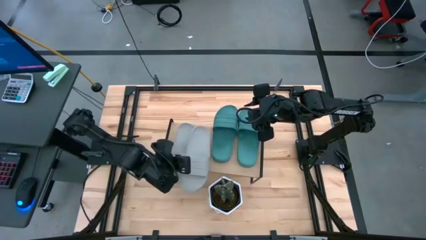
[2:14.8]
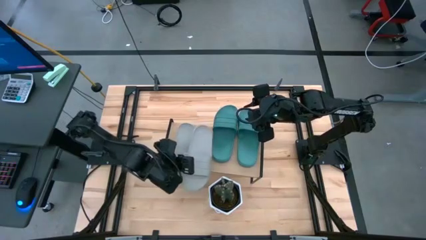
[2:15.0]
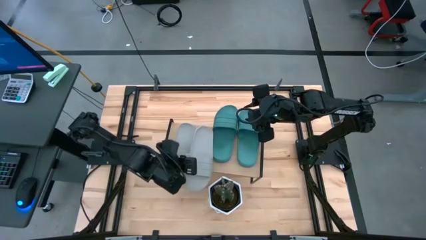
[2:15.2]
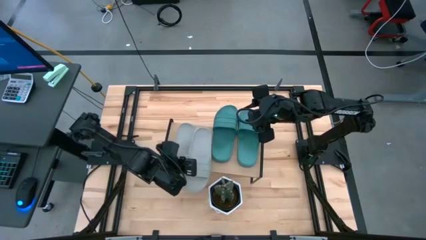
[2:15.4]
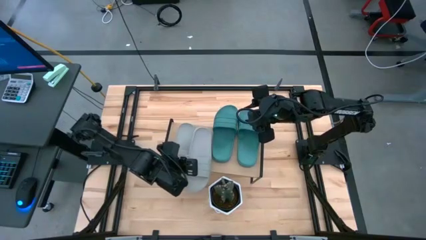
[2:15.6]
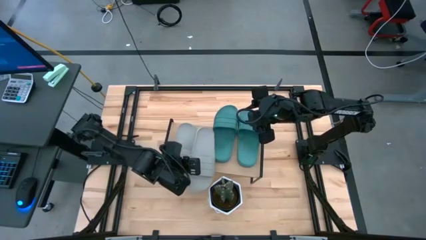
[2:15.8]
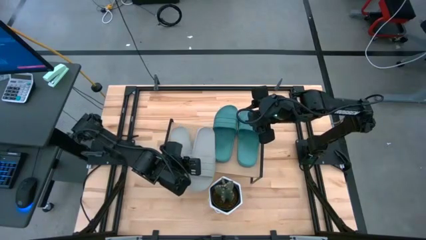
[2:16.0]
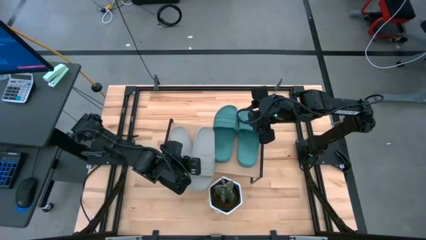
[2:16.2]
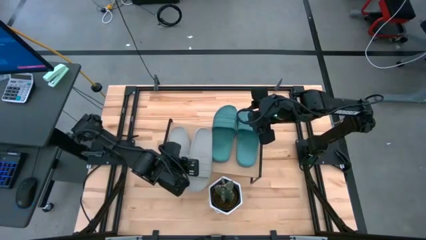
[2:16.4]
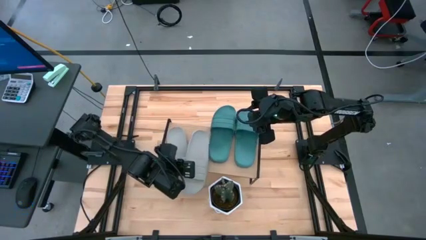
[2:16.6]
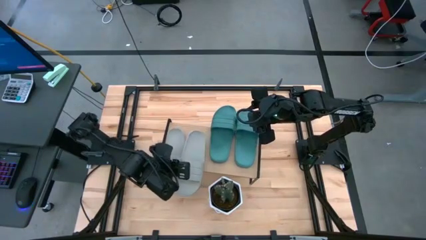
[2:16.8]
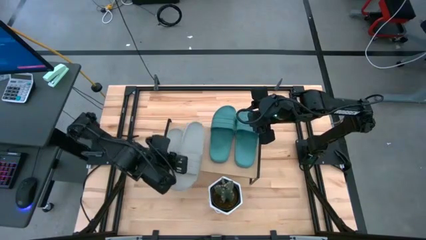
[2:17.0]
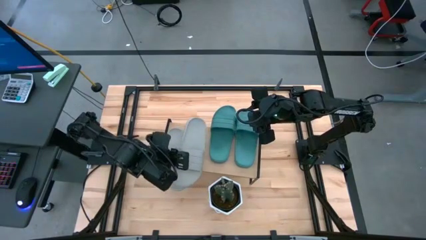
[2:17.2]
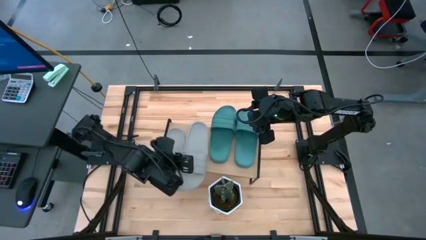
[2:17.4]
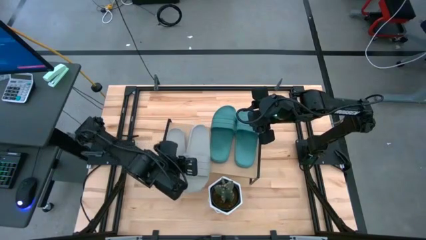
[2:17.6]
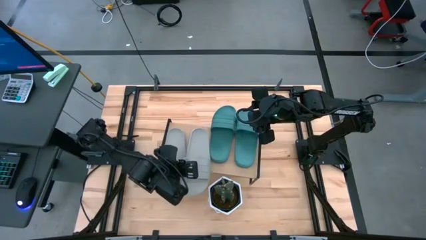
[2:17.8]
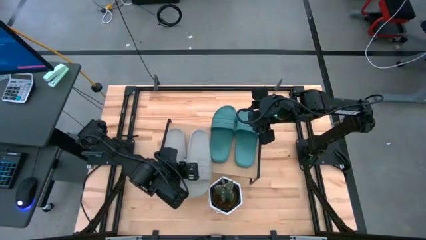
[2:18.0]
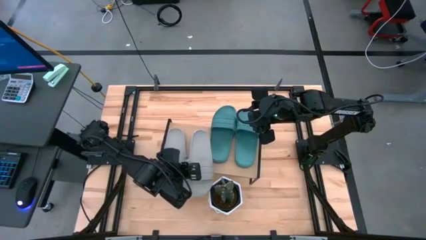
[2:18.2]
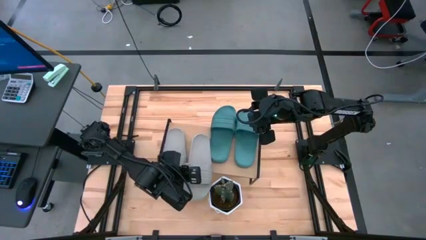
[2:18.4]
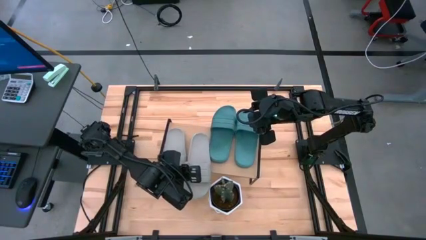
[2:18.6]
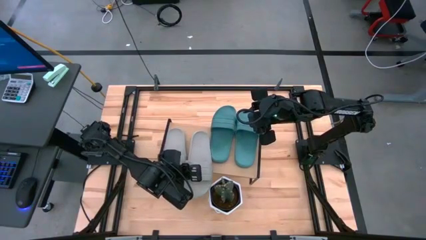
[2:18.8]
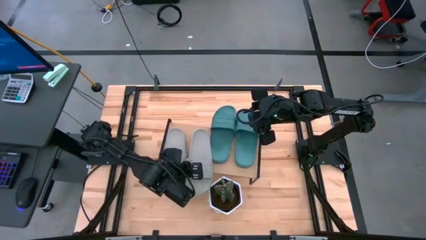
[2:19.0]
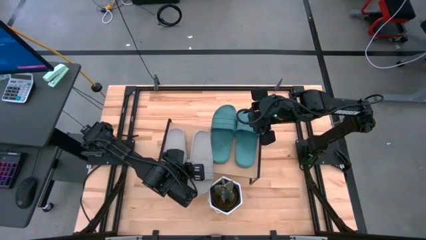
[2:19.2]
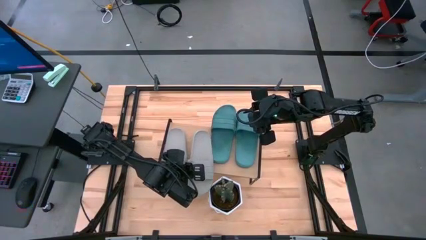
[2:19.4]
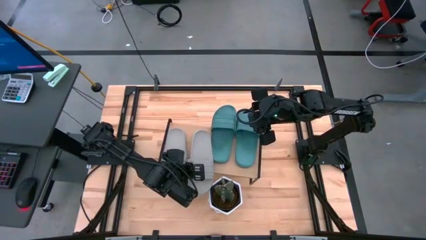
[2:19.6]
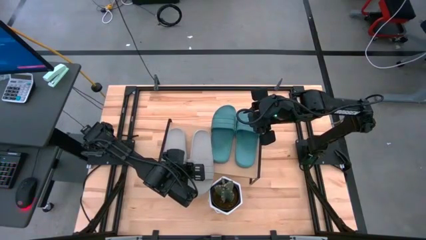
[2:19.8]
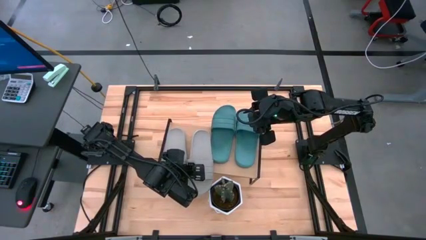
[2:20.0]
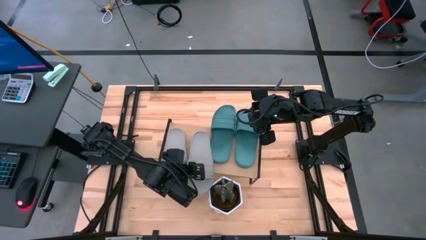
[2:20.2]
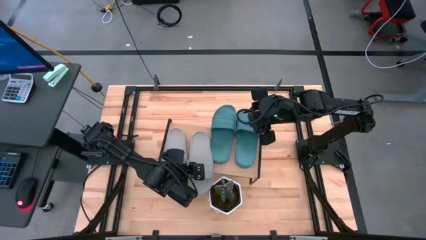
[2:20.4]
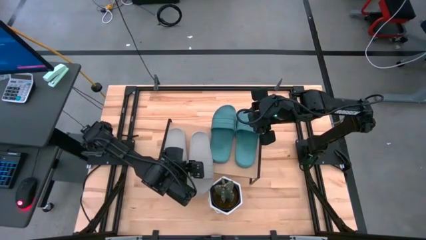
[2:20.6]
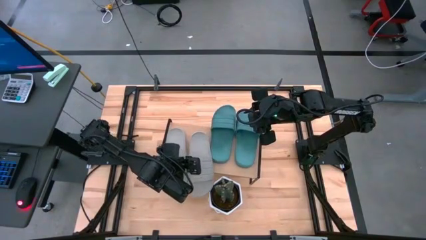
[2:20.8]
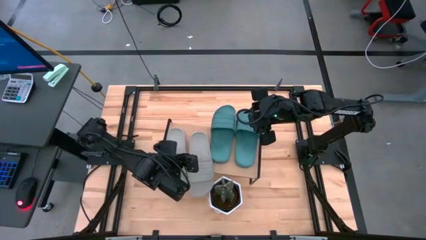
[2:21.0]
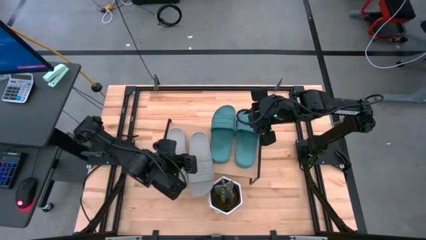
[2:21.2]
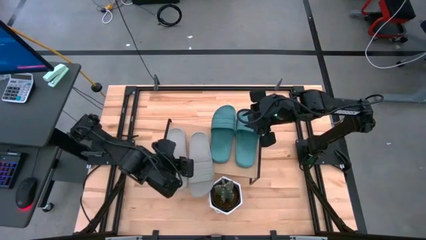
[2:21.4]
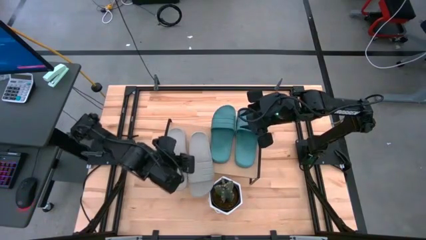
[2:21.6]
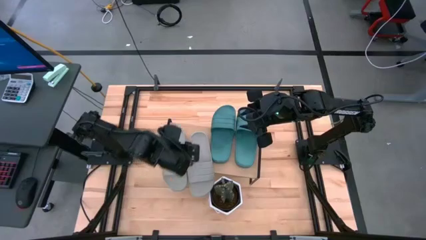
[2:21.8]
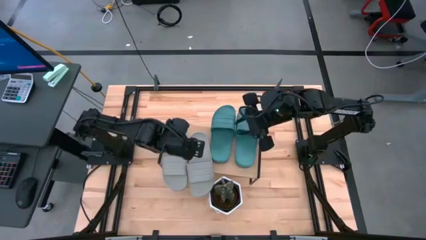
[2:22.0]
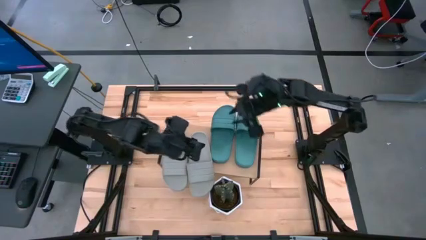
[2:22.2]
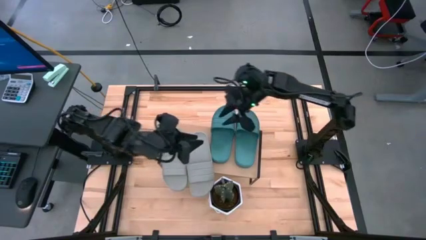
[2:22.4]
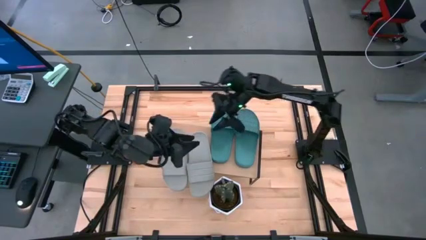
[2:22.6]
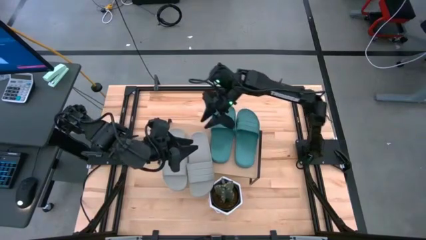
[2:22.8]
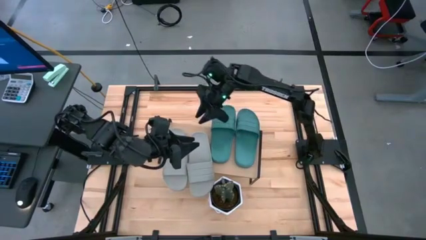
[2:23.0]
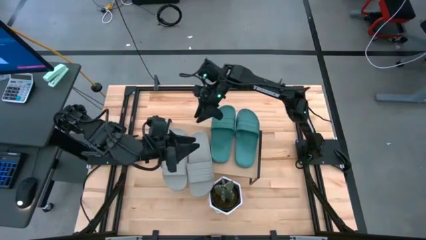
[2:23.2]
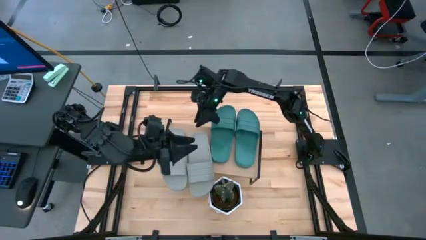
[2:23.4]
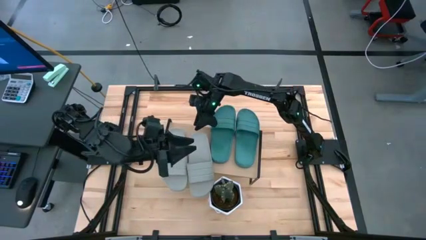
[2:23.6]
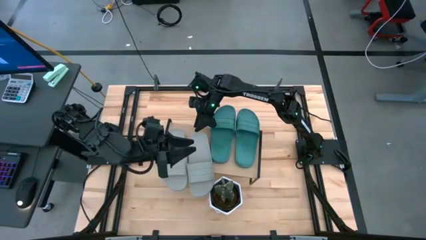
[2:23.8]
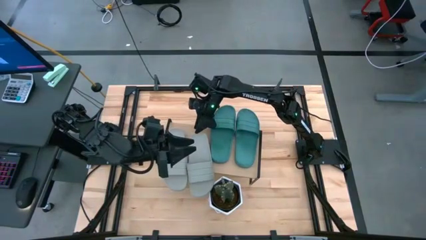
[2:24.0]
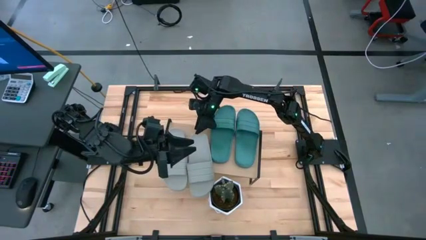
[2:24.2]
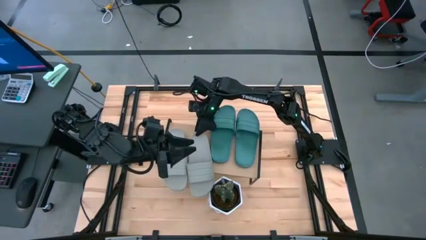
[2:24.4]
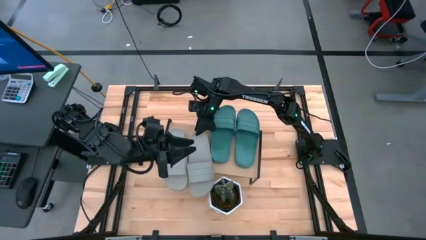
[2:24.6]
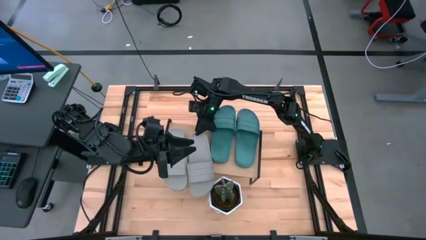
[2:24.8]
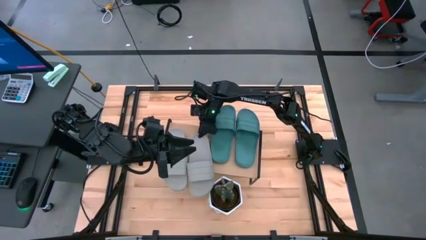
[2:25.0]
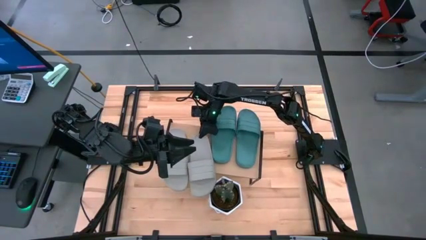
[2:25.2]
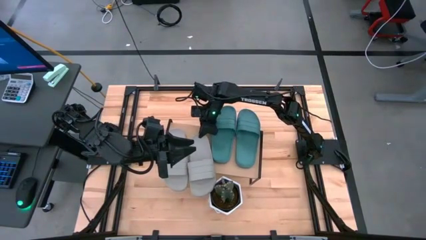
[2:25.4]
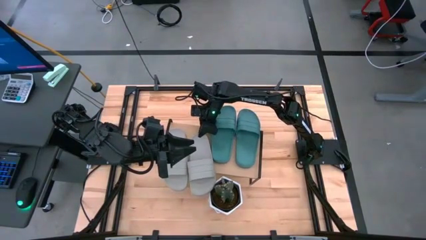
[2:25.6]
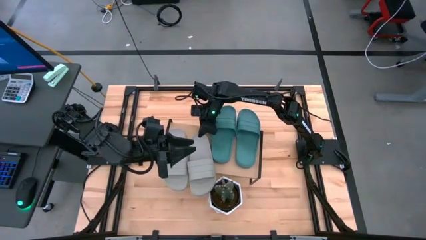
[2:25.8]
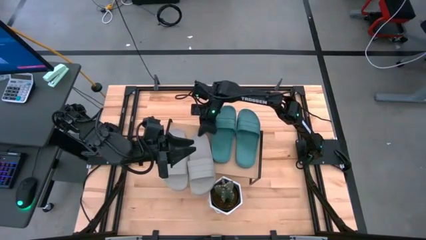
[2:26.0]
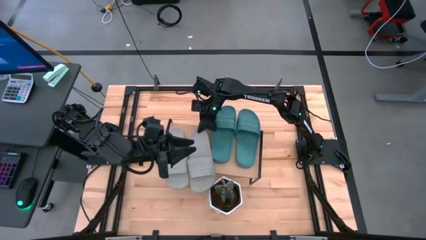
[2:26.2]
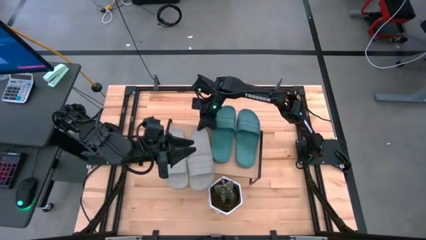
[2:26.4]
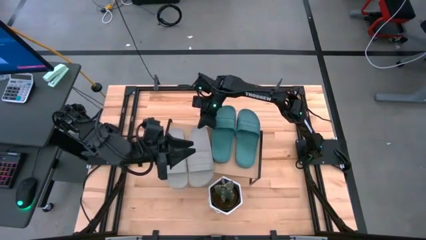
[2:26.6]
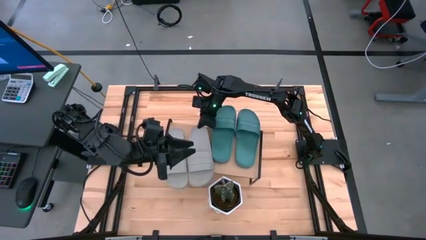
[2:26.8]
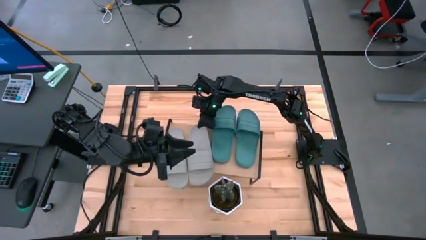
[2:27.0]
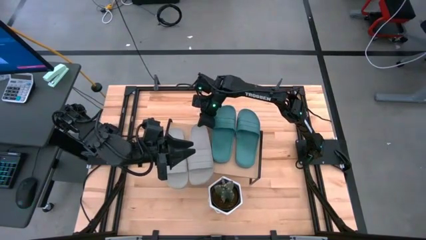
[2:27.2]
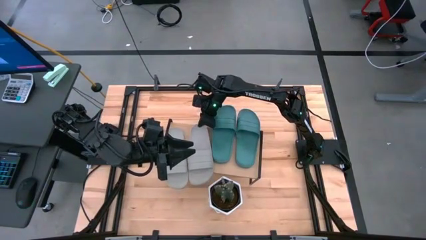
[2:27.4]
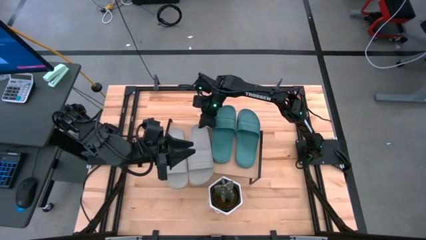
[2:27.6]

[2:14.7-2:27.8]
Task: Pick and place slides into the shelf
Put the gray slide on the shelf
